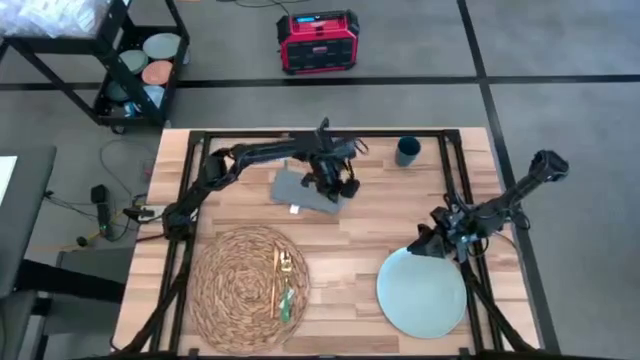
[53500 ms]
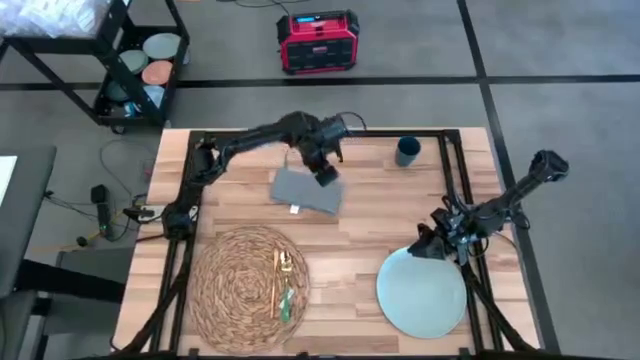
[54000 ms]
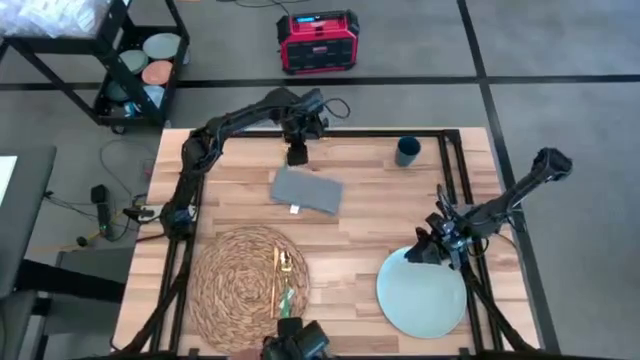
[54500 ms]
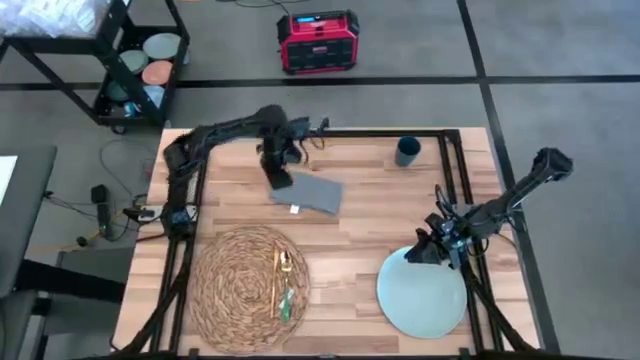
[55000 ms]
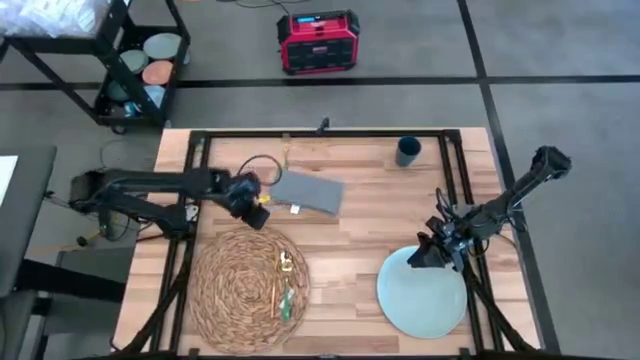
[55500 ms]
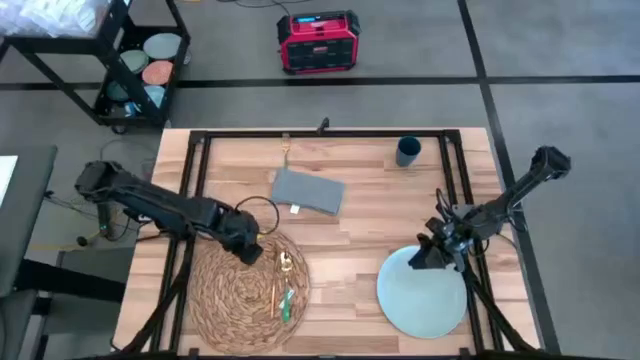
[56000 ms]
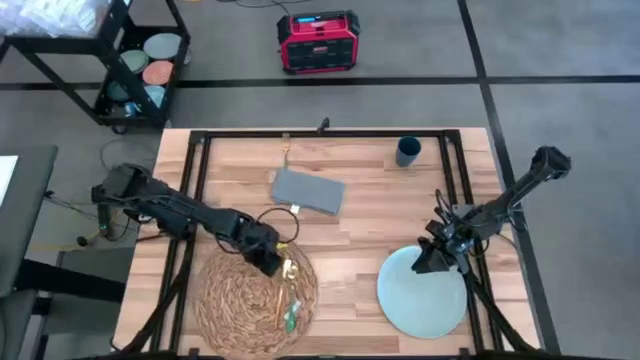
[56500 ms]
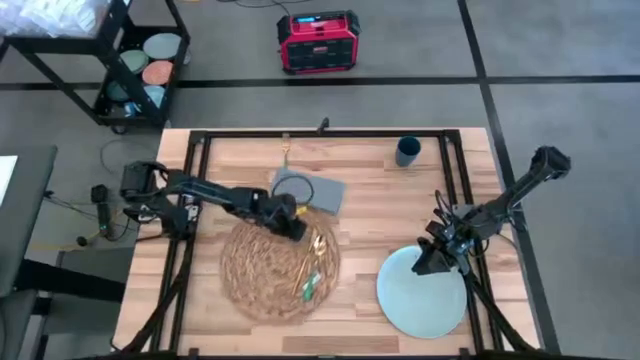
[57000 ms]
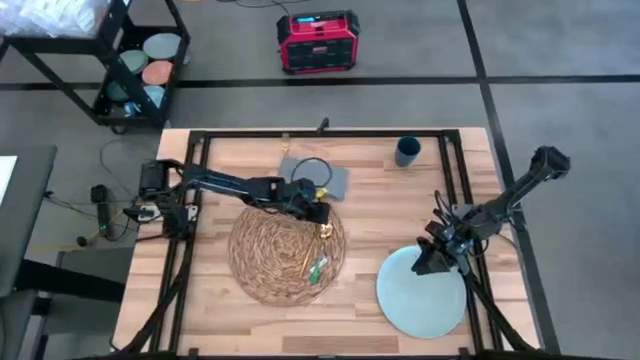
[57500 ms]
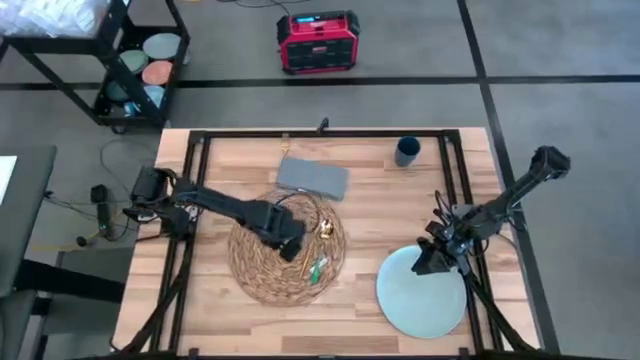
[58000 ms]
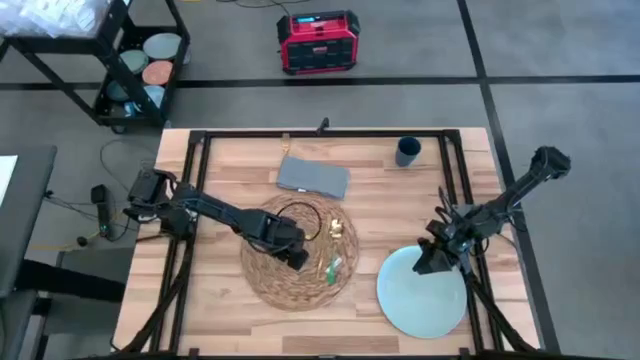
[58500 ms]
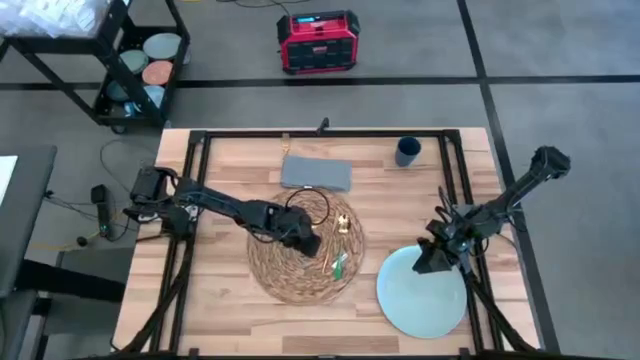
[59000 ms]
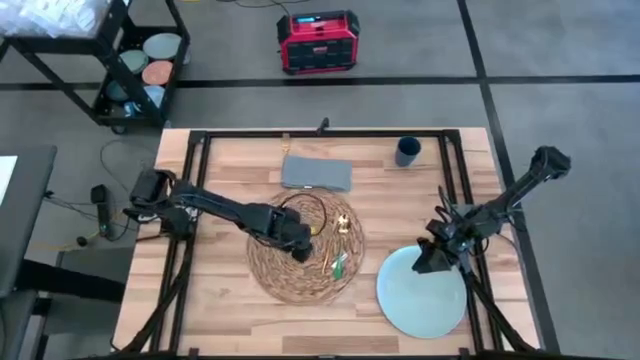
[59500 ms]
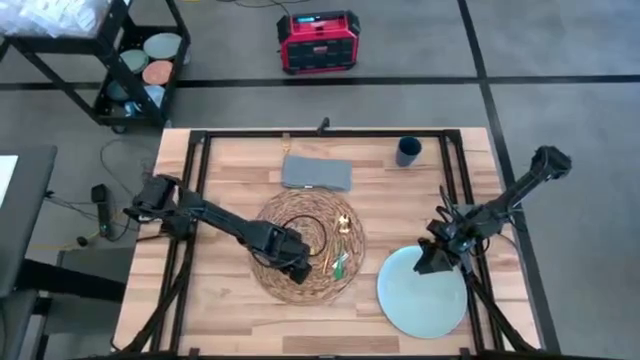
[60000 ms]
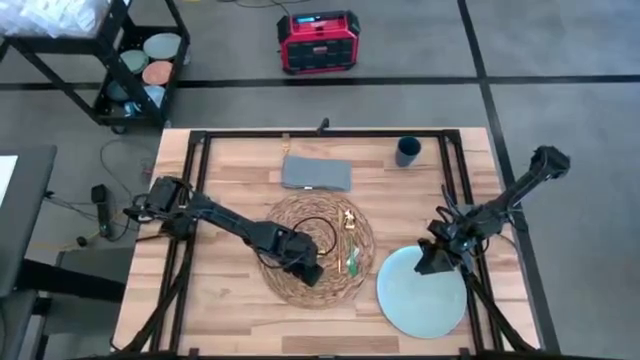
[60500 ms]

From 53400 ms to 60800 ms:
Task: Set table place
Move the brown table mat to the center of the table

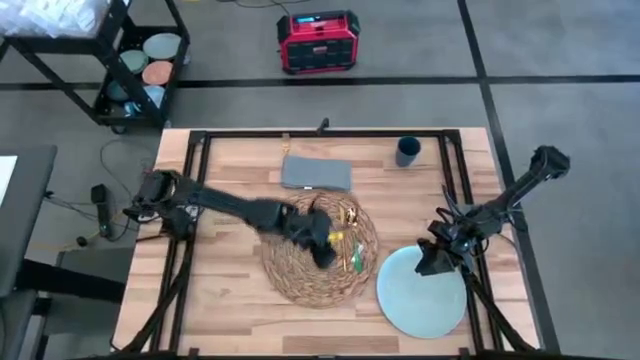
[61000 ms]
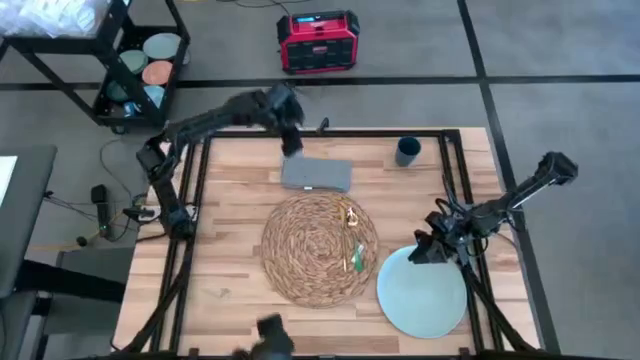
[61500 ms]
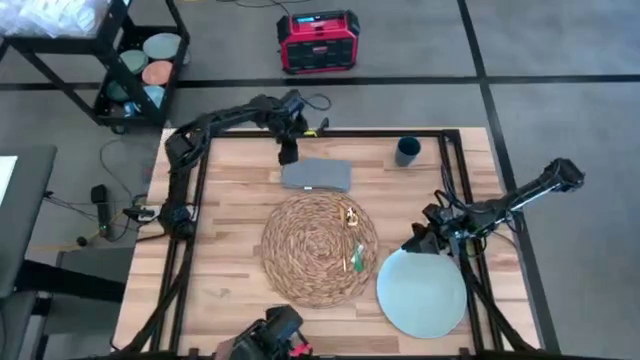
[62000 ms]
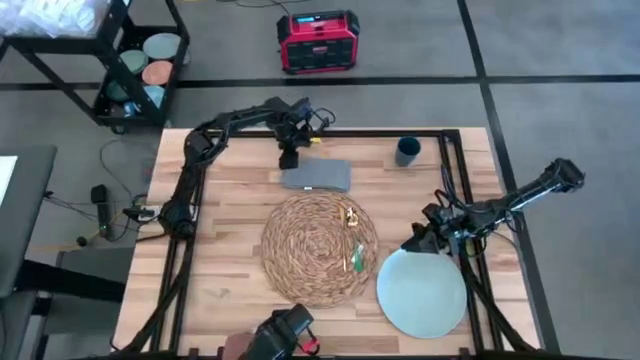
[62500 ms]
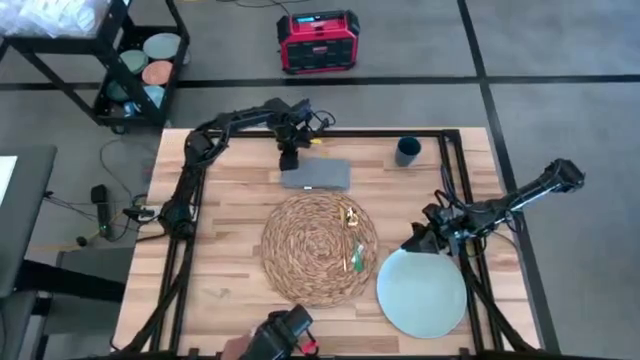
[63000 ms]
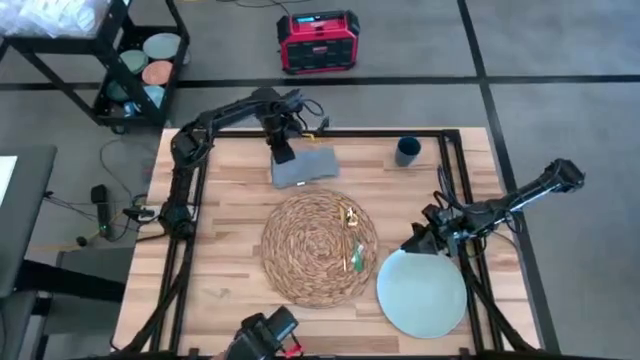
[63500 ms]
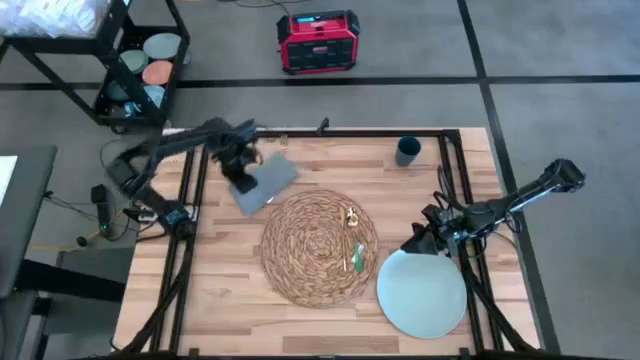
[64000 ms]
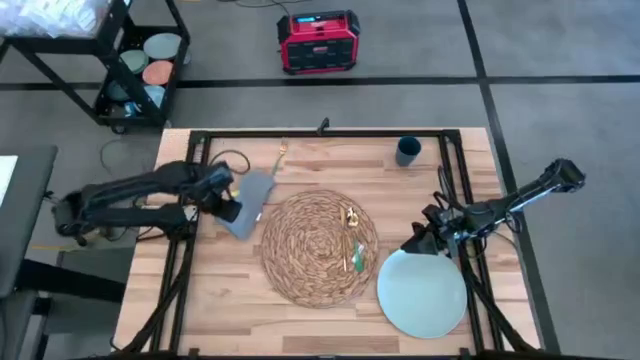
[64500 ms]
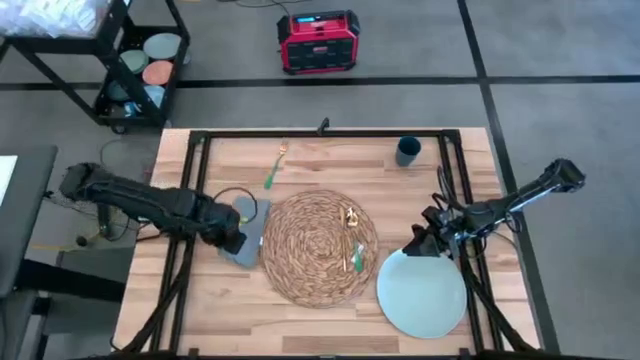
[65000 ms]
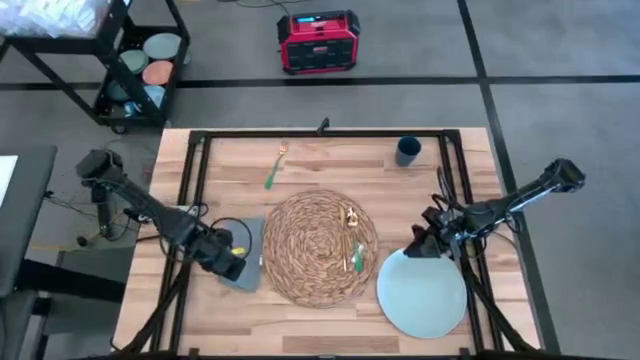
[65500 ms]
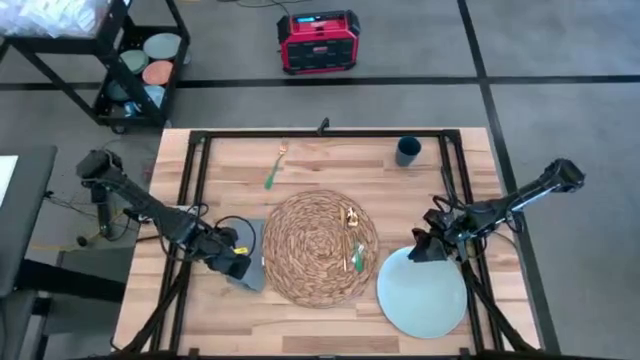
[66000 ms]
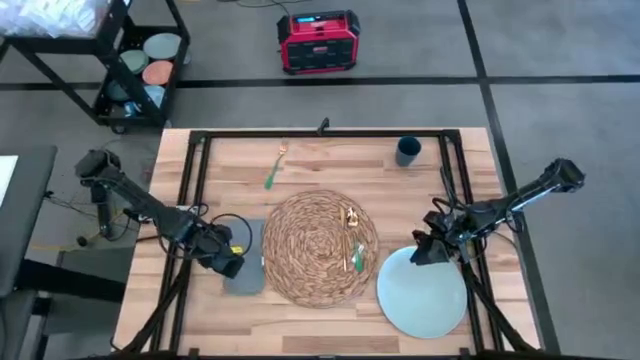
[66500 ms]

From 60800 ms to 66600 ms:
Move the gray table napkin to the left of the brown table mat

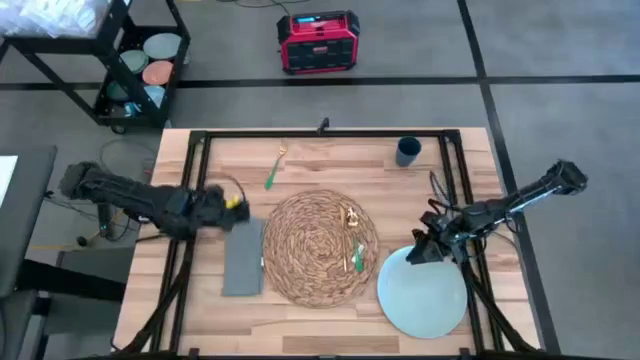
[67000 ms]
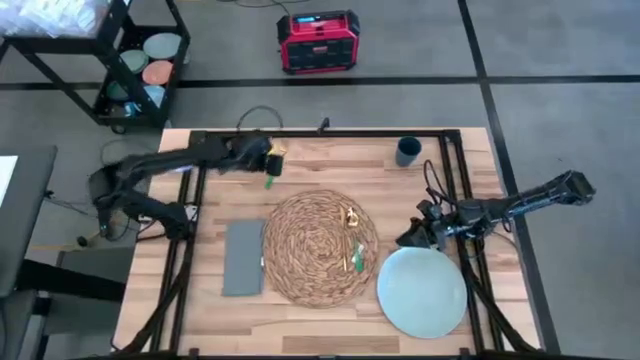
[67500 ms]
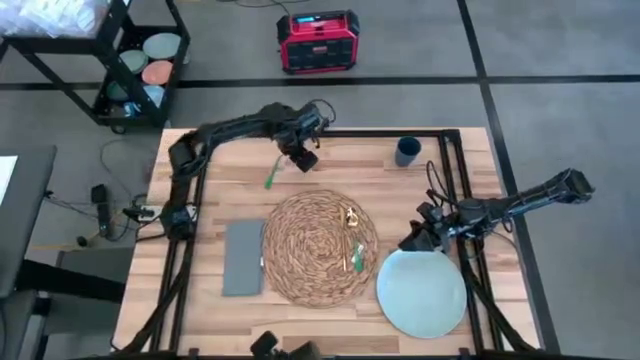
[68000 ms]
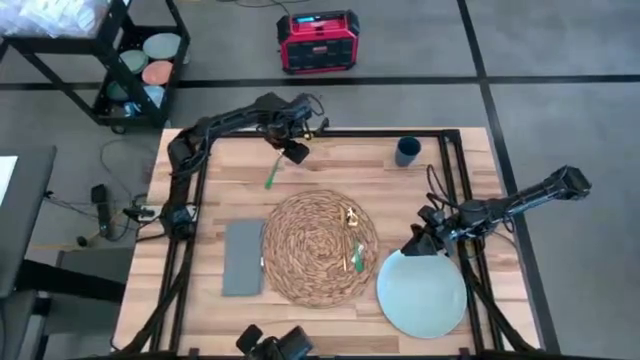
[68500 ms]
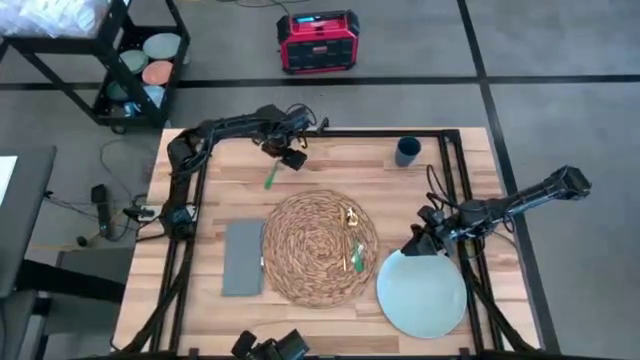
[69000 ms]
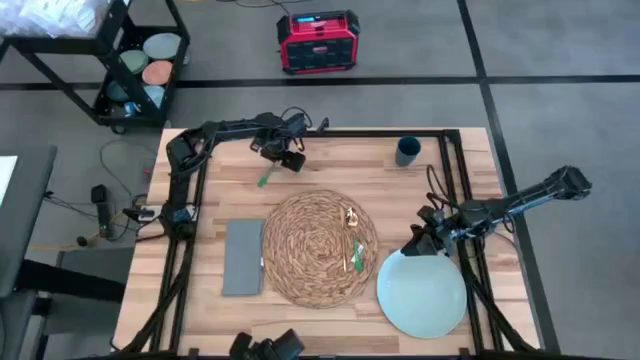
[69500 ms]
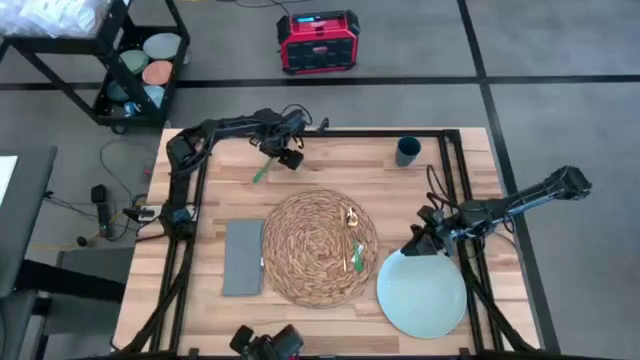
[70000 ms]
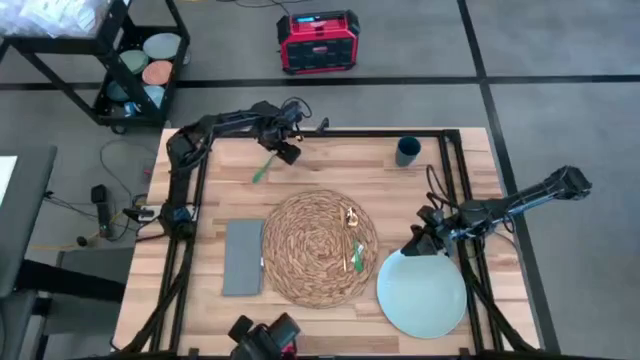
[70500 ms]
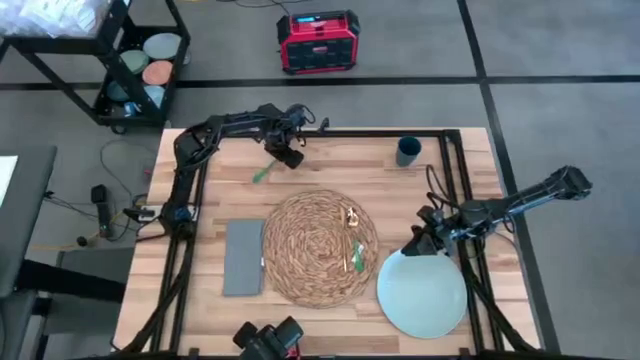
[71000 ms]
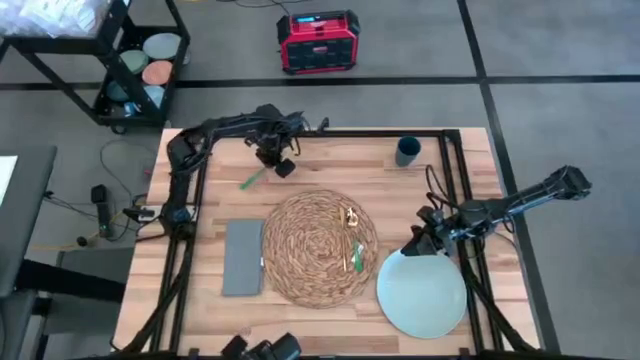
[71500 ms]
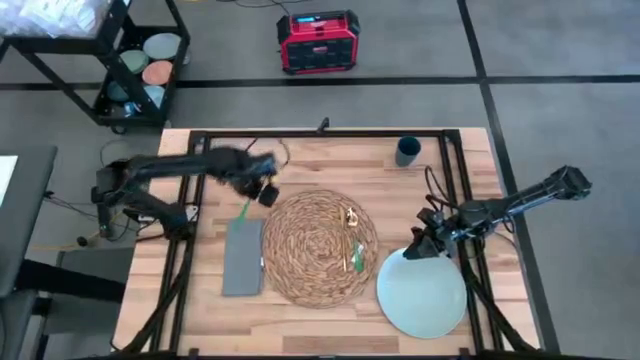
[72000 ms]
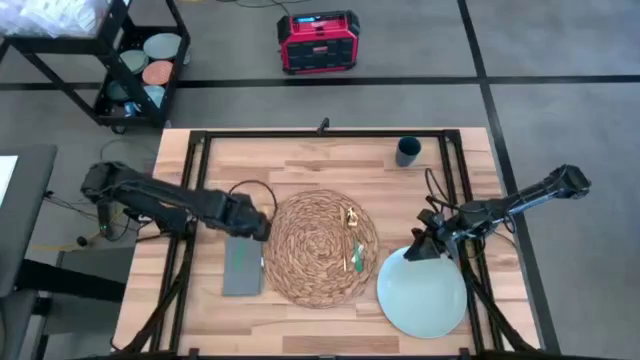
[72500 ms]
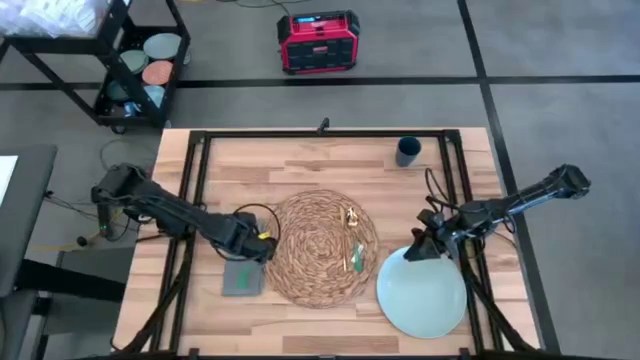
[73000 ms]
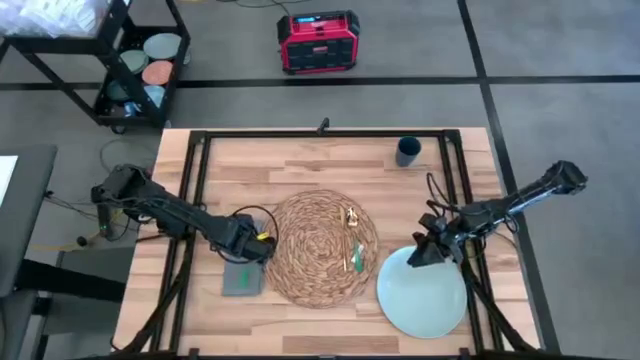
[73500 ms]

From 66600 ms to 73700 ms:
Put the green fork on the gray table napkin

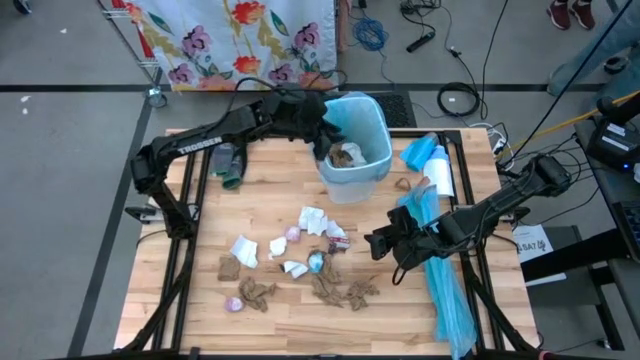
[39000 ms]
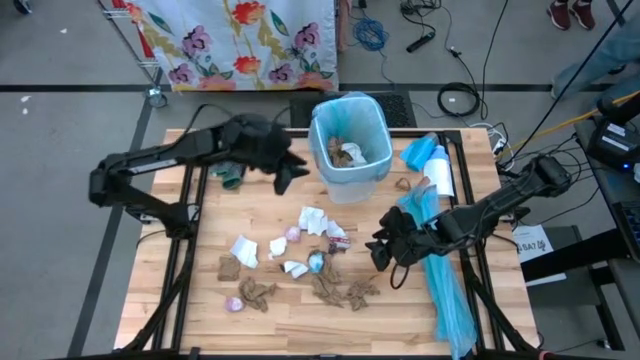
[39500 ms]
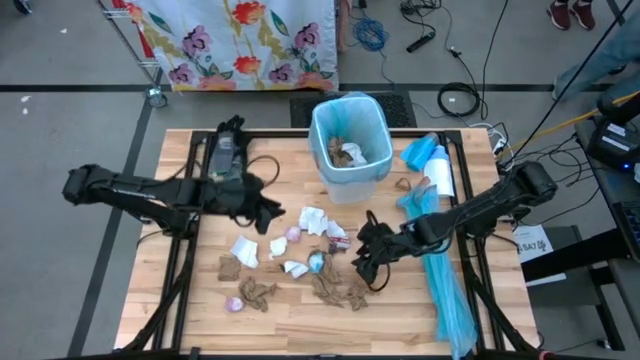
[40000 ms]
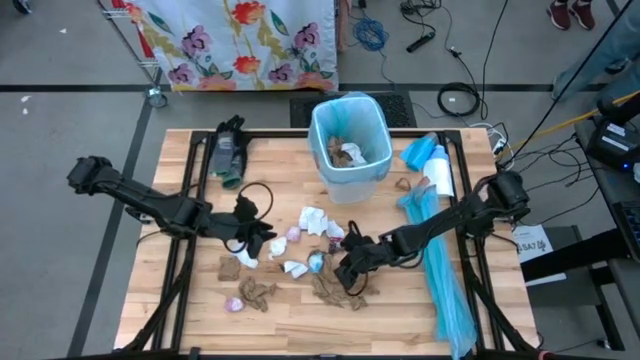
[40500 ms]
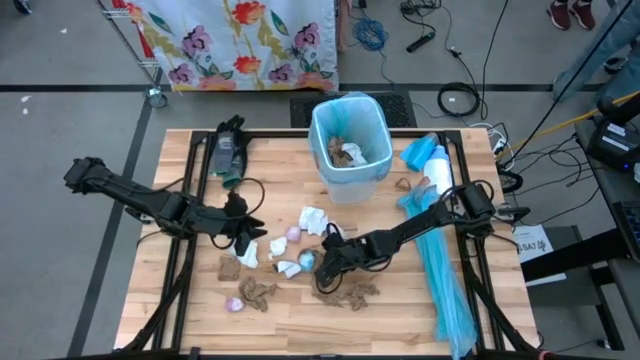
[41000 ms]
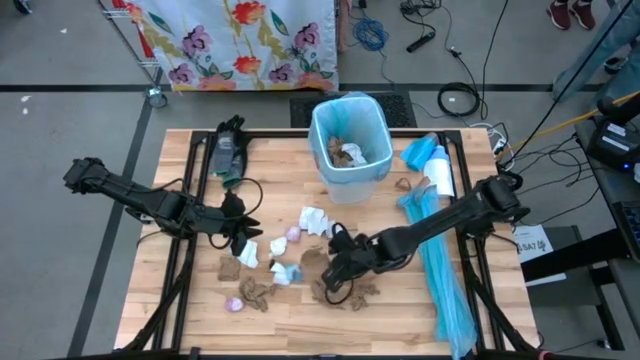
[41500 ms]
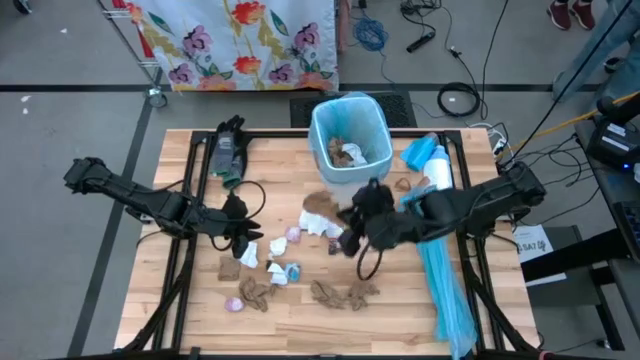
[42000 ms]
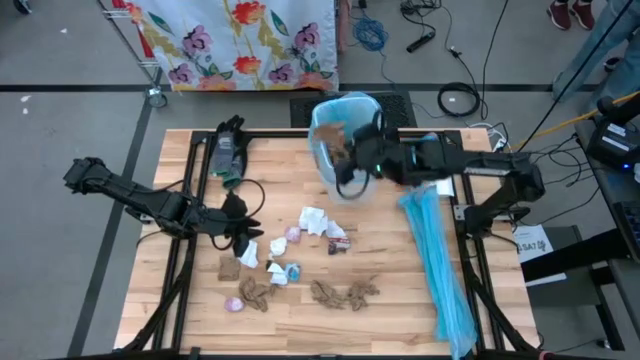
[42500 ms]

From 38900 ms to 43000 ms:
Task: place trash/remove bag and relplace
Put the brown napkin into the trash bin
